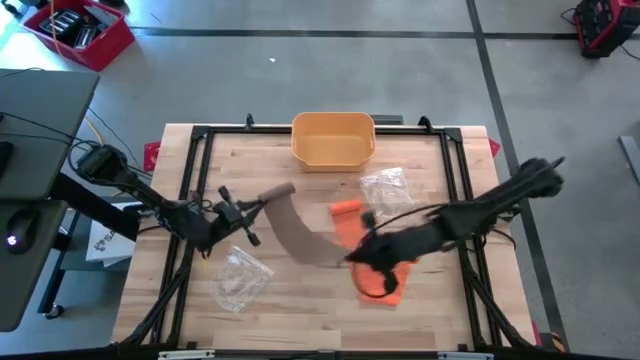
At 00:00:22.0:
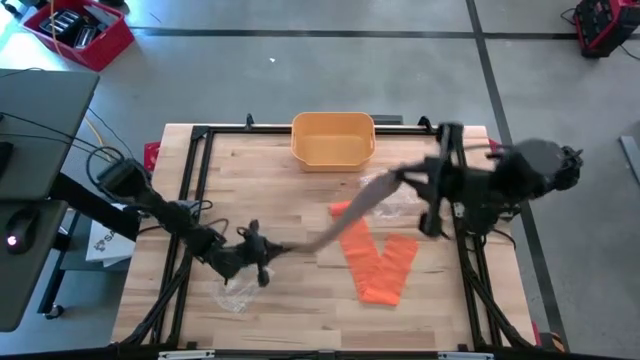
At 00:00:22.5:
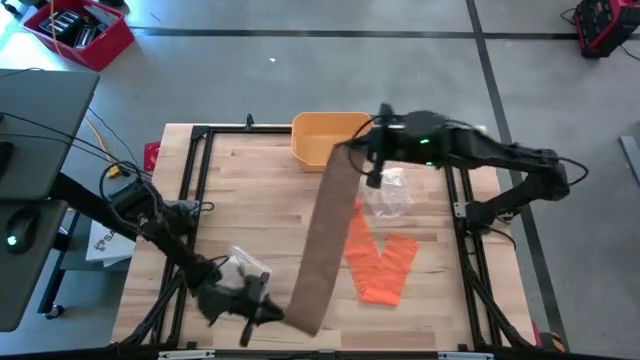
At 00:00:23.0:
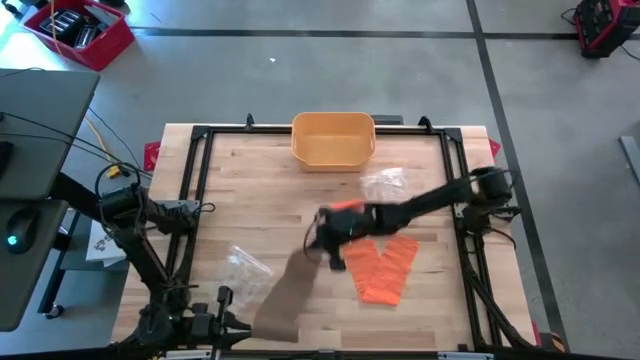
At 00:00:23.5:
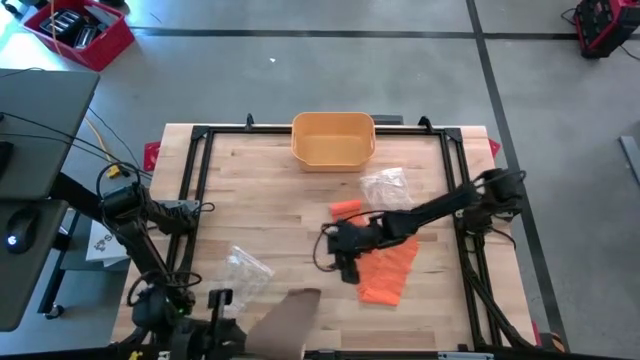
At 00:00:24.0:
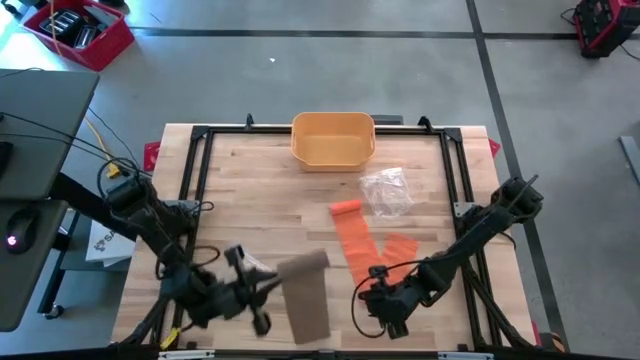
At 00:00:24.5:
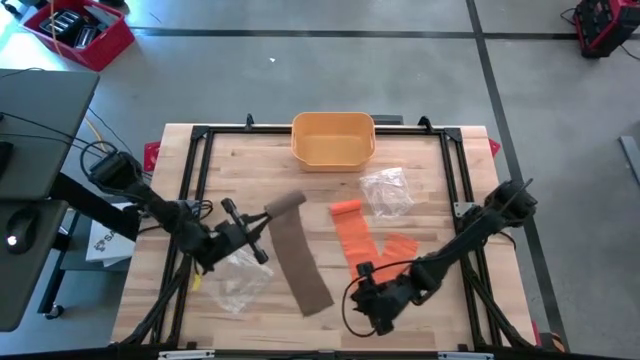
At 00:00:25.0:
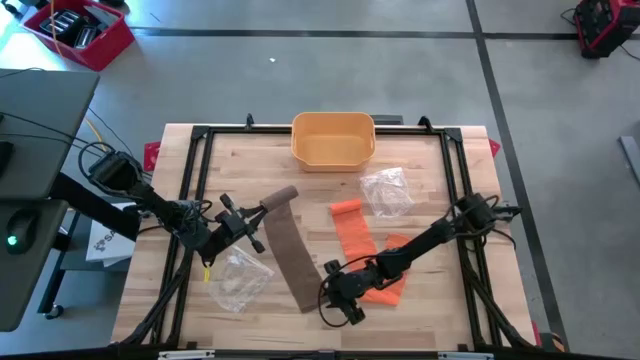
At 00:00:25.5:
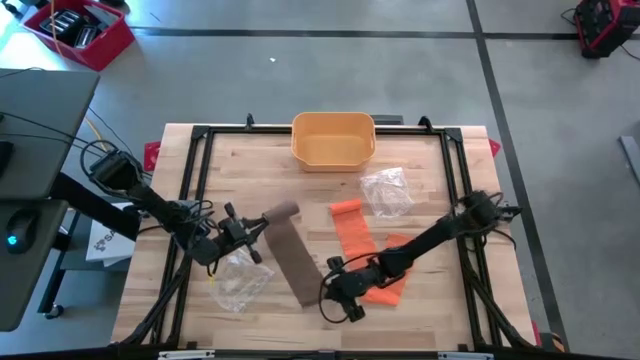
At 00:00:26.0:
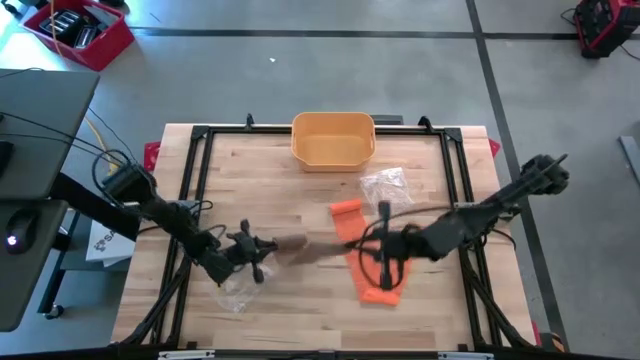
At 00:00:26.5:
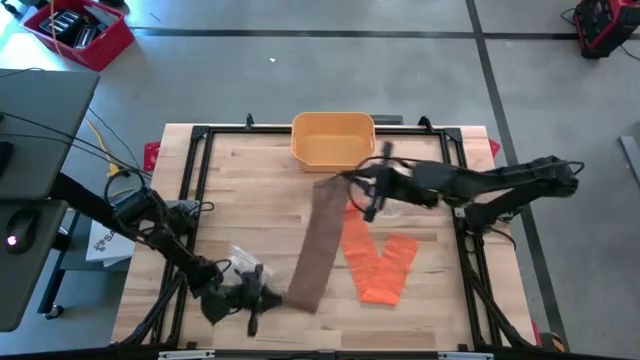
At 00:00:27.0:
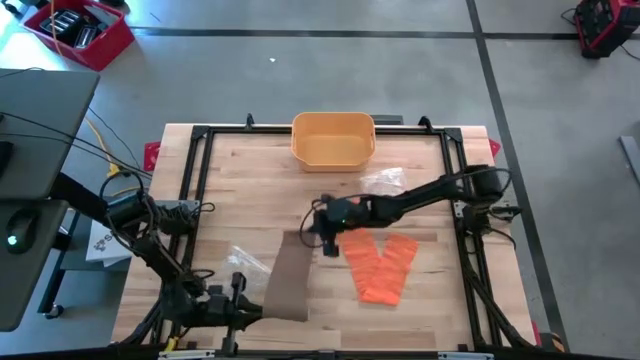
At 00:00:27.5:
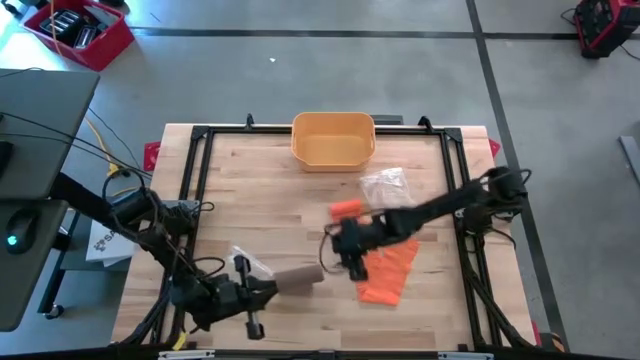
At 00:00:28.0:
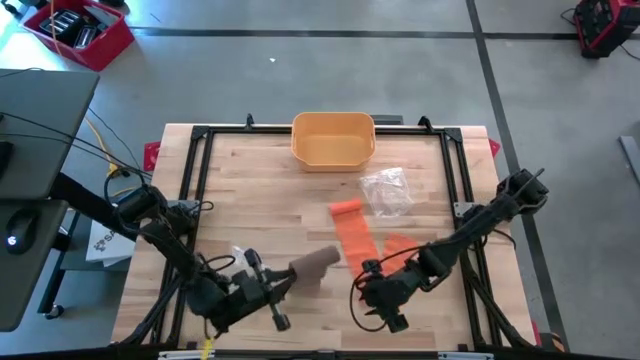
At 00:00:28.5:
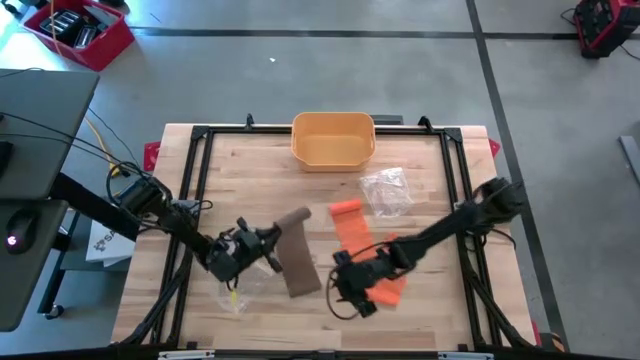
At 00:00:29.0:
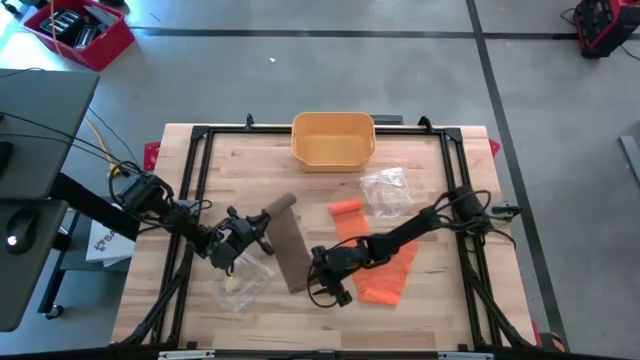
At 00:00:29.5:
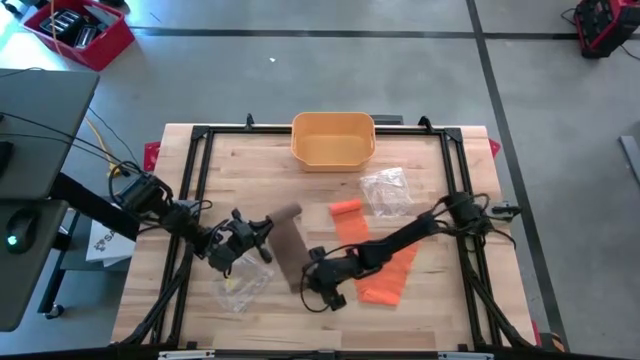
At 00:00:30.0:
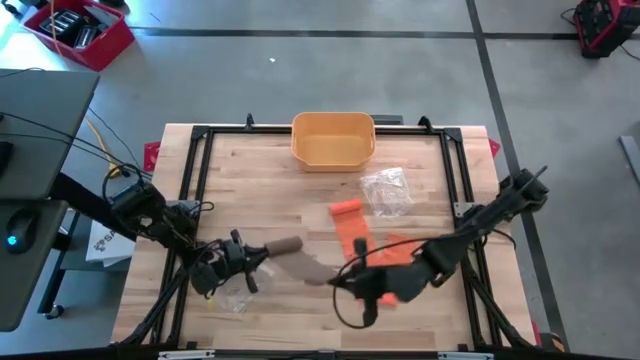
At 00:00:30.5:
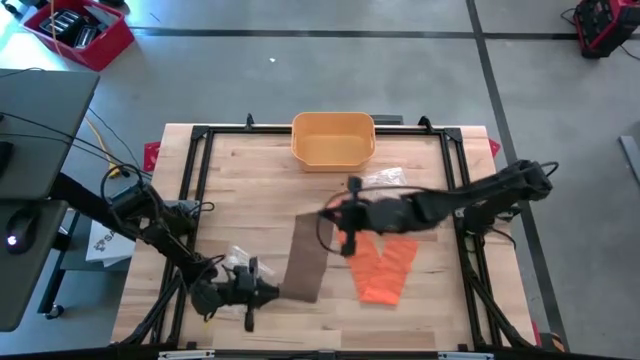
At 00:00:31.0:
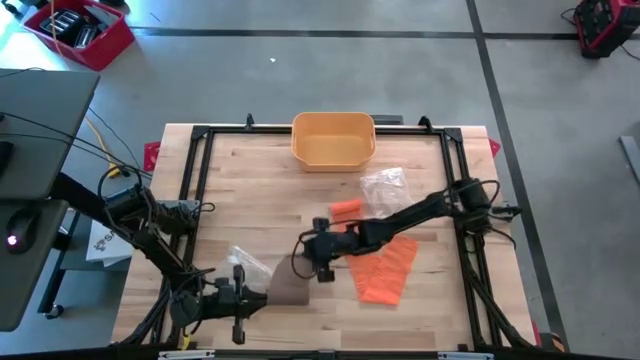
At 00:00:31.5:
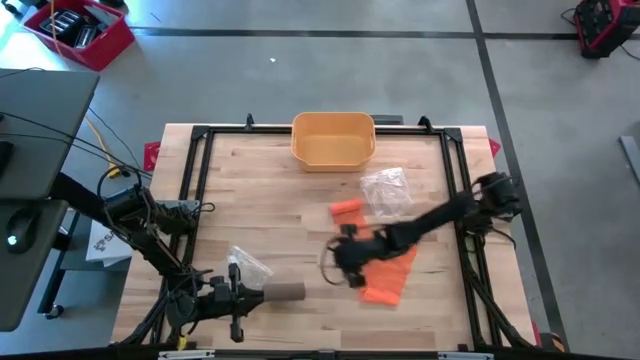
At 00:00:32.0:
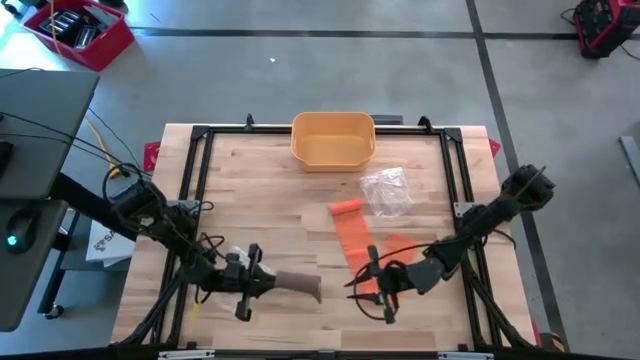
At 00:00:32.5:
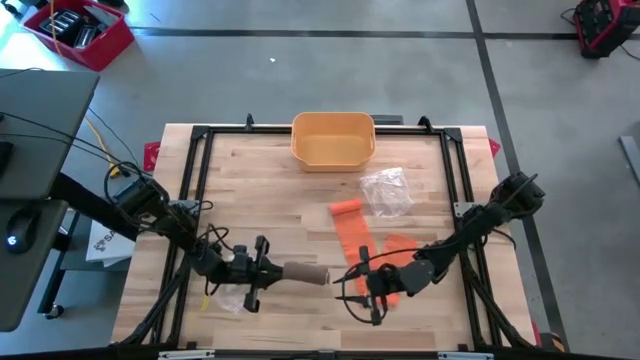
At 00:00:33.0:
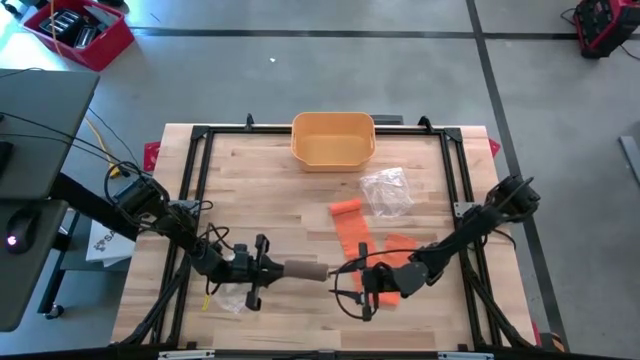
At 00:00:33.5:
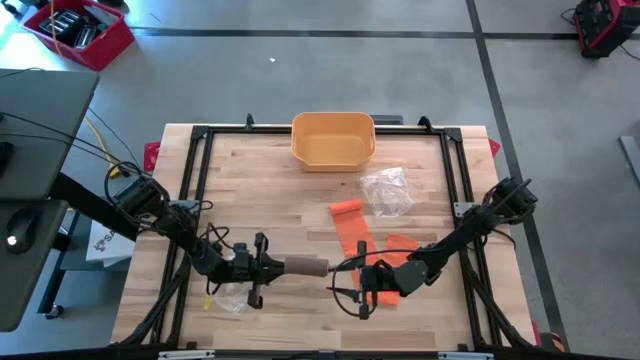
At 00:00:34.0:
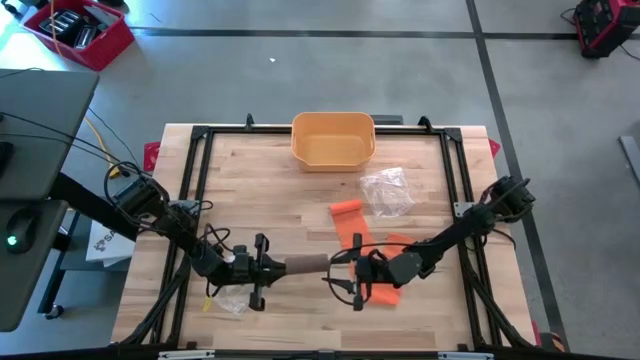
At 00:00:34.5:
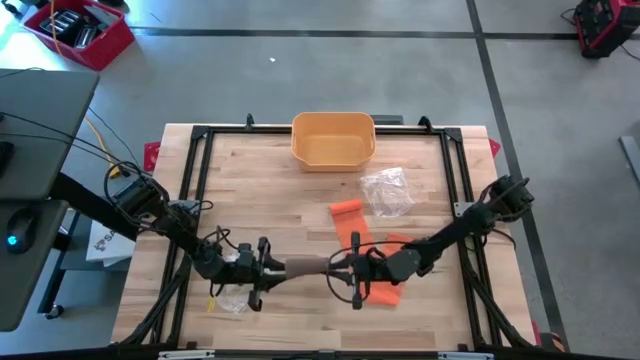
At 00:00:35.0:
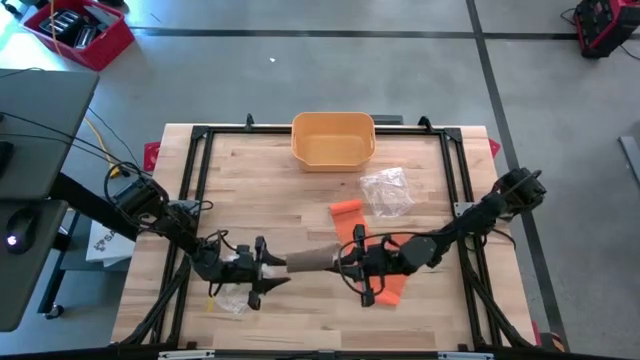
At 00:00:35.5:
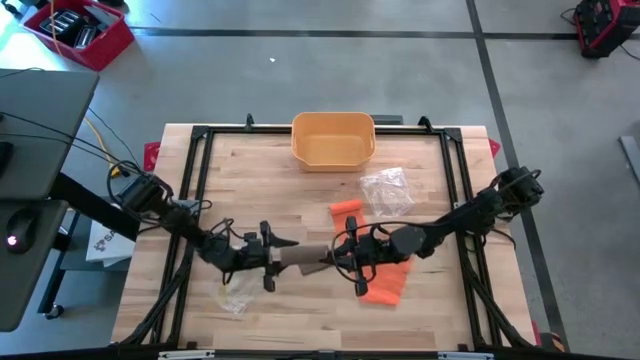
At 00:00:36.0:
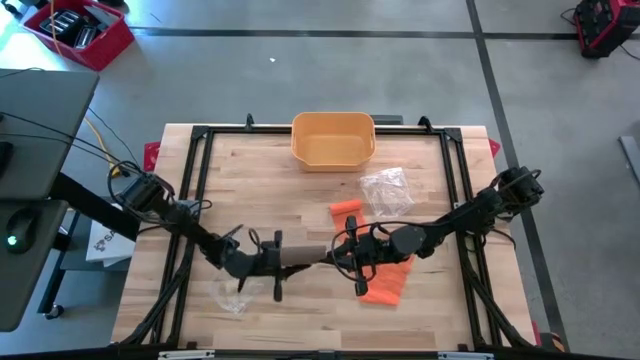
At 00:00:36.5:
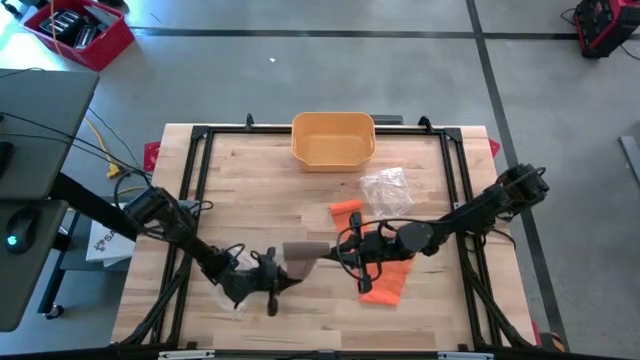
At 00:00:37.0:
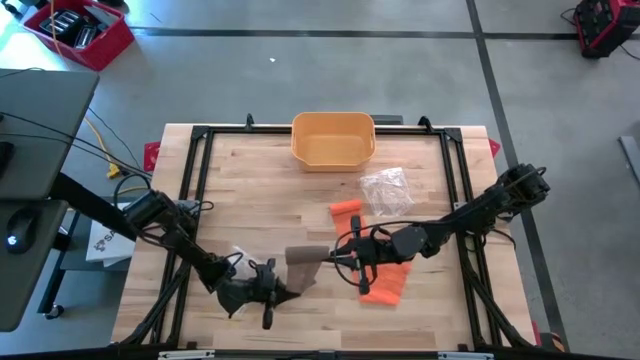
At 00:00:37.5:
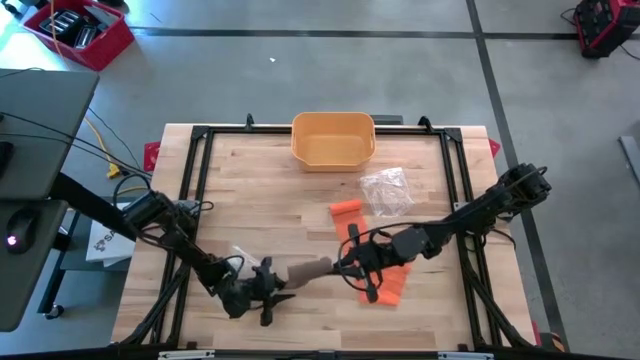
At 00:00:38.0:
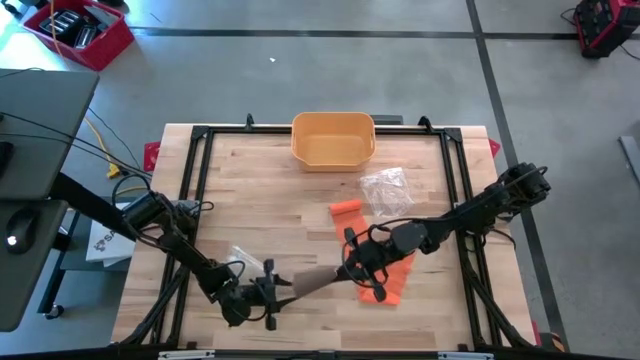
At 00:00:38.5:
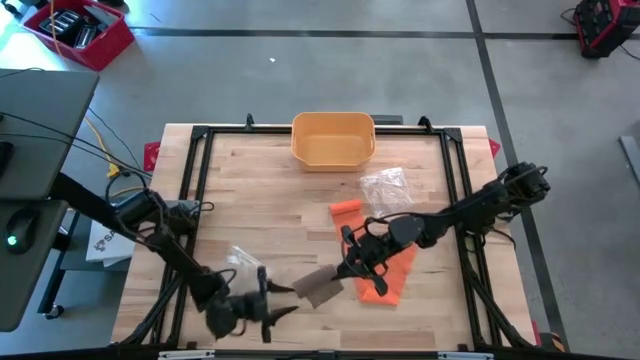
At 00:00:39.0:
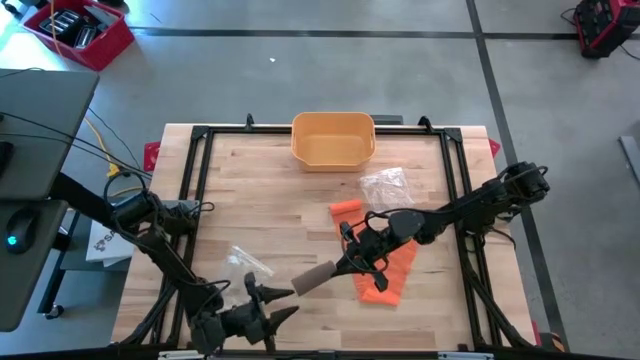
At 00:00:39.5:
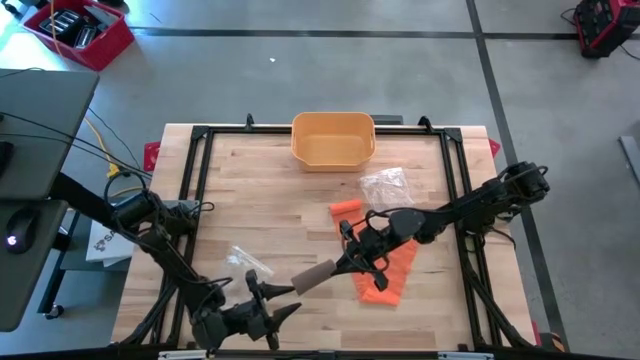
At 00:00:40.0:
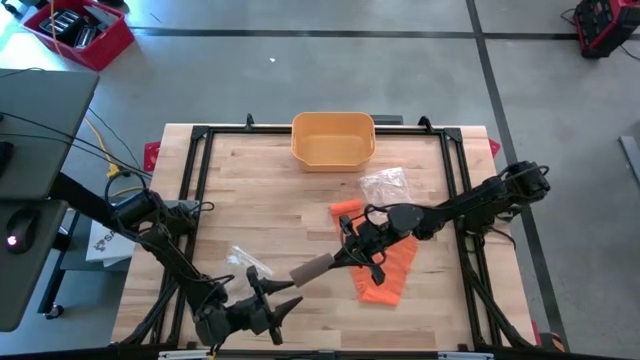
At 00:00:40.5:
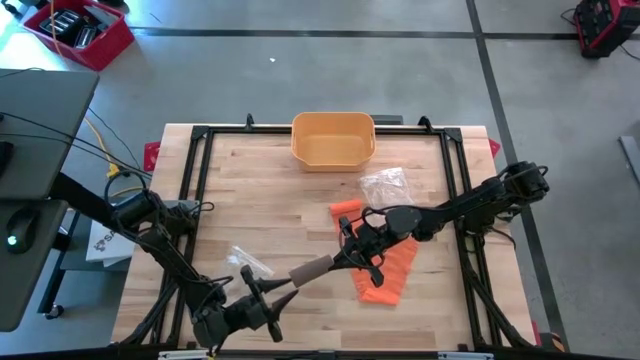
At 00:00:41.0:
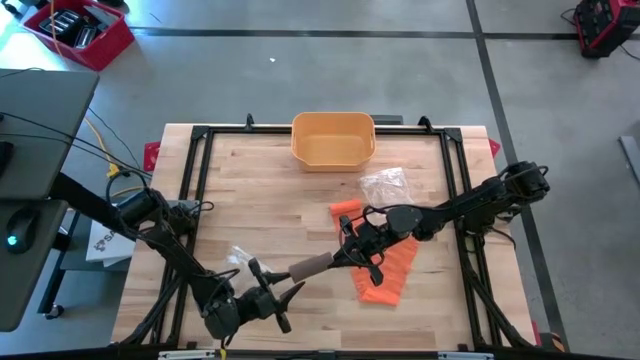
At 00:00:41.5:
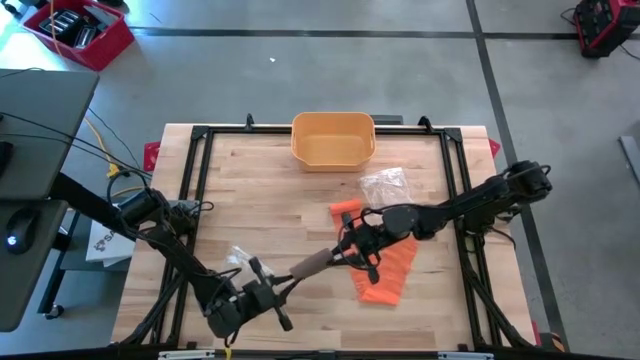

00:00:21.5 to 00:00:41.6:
Task: Roll bandage
Roll the brown bandage
